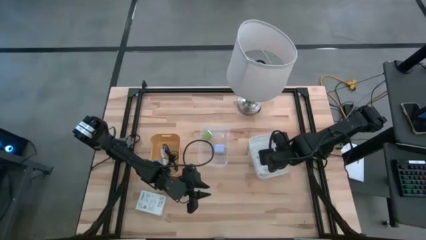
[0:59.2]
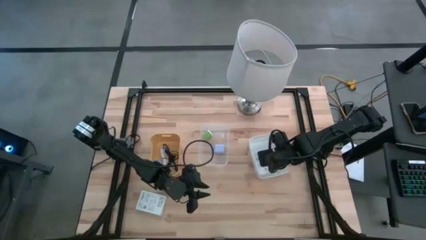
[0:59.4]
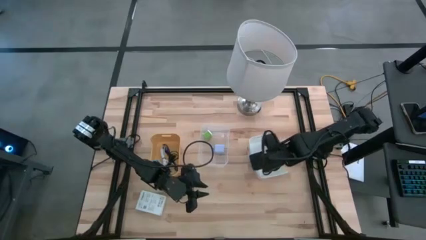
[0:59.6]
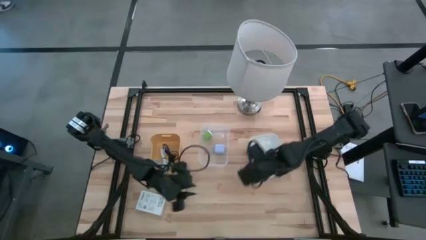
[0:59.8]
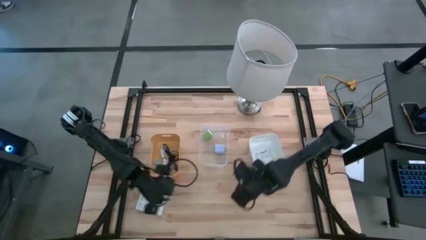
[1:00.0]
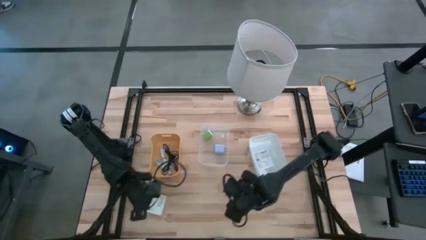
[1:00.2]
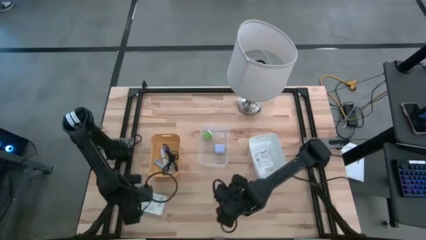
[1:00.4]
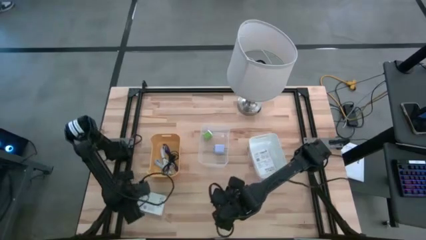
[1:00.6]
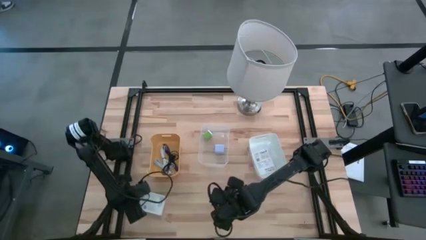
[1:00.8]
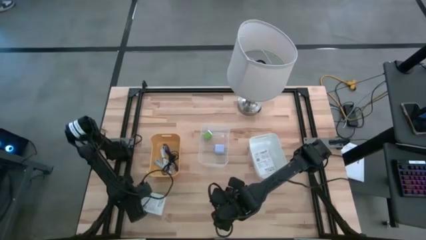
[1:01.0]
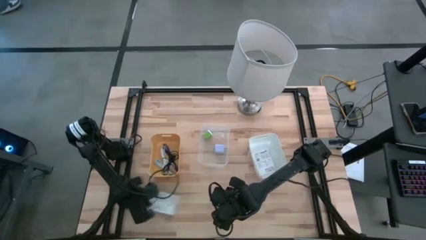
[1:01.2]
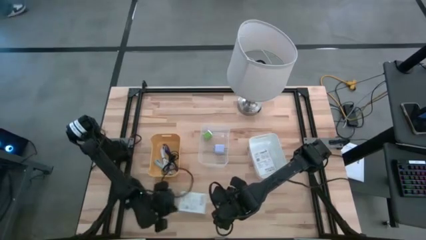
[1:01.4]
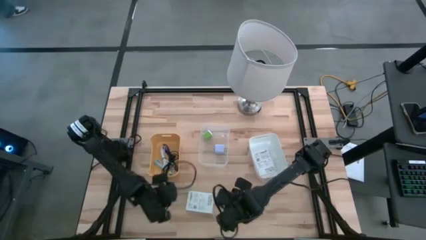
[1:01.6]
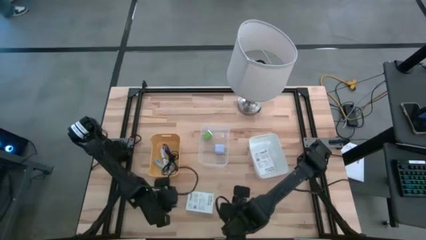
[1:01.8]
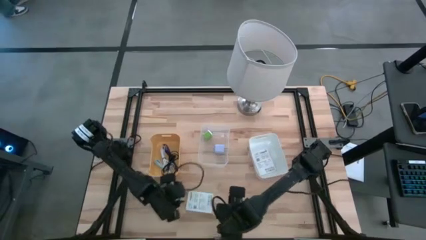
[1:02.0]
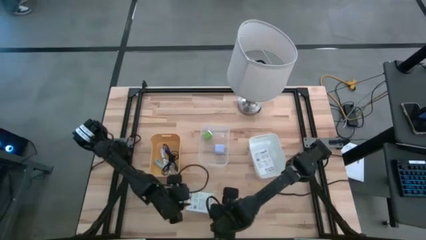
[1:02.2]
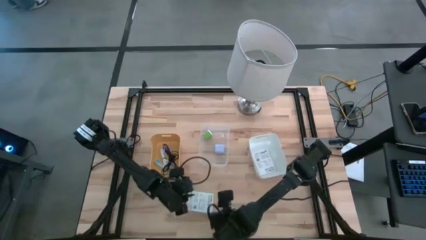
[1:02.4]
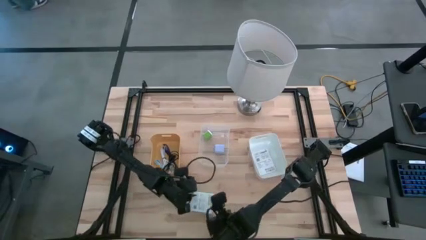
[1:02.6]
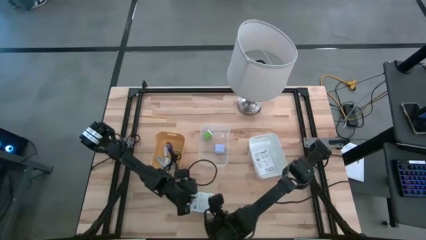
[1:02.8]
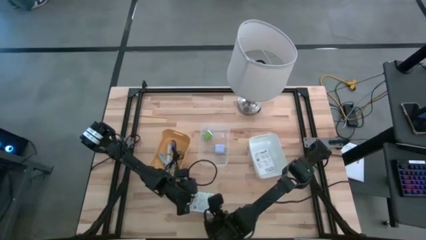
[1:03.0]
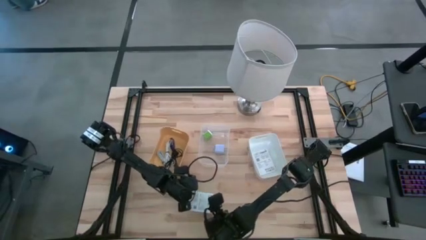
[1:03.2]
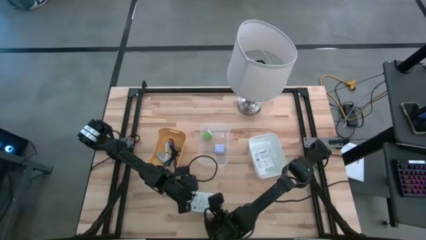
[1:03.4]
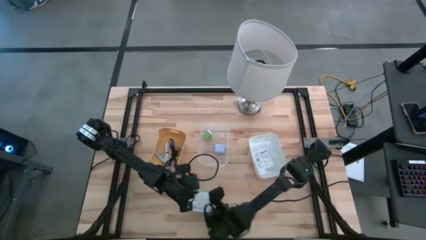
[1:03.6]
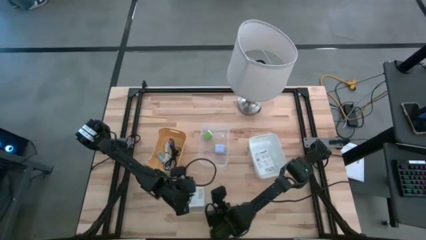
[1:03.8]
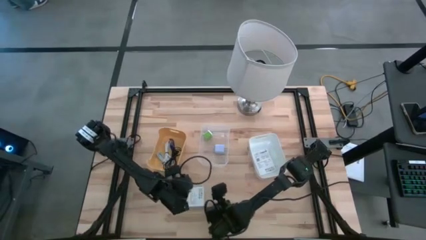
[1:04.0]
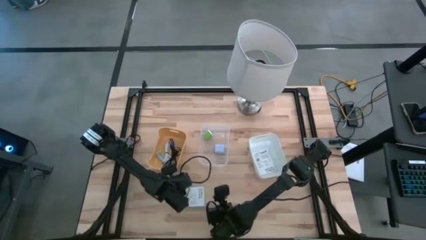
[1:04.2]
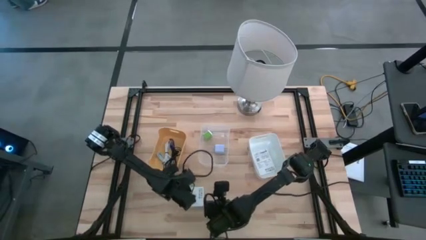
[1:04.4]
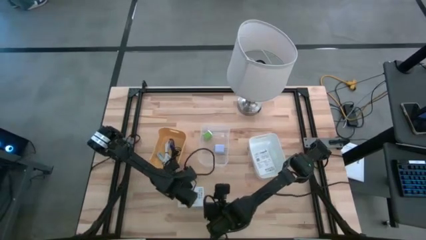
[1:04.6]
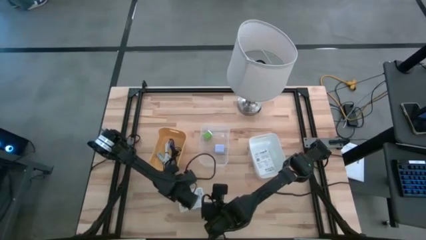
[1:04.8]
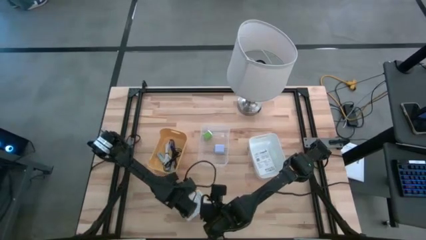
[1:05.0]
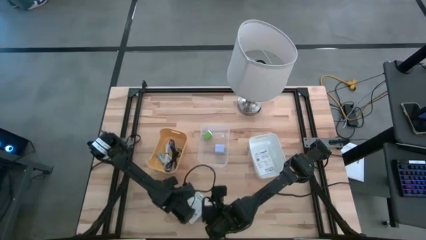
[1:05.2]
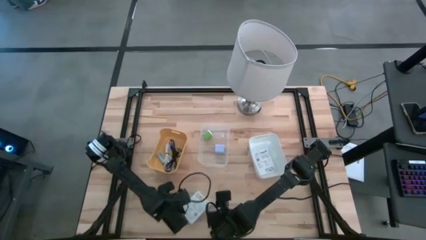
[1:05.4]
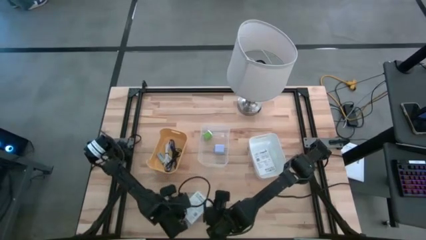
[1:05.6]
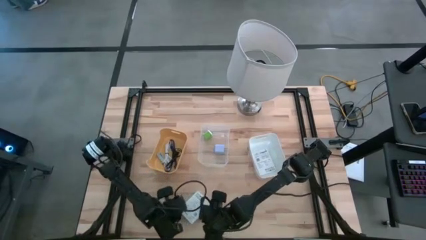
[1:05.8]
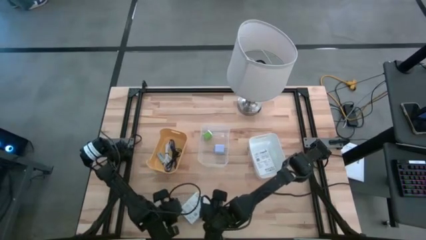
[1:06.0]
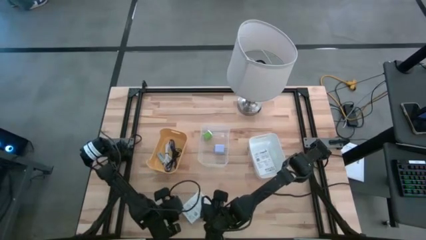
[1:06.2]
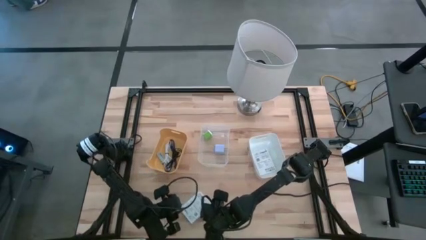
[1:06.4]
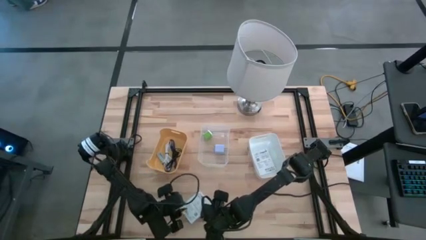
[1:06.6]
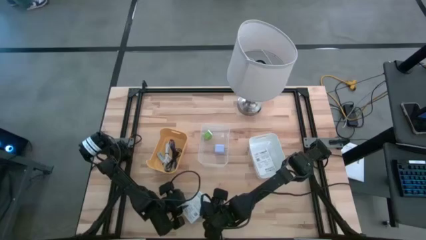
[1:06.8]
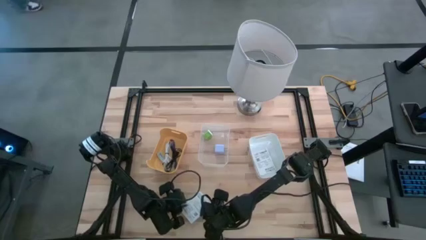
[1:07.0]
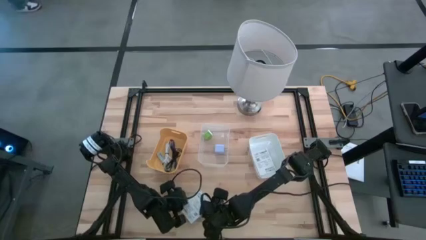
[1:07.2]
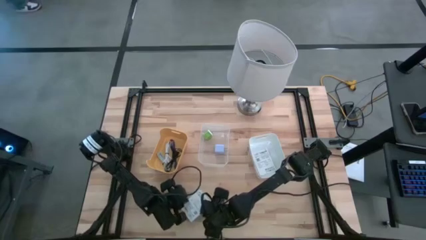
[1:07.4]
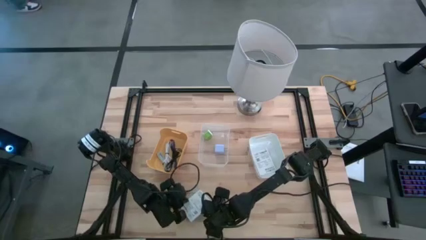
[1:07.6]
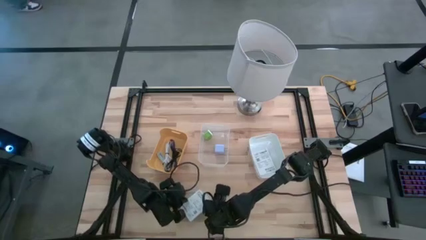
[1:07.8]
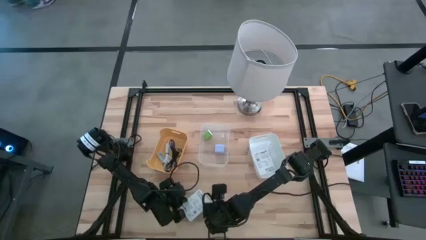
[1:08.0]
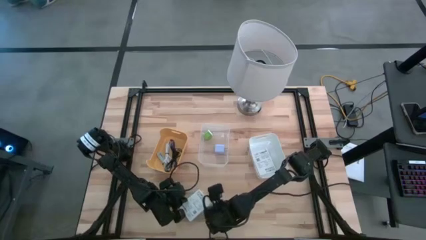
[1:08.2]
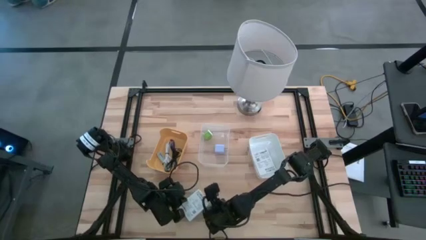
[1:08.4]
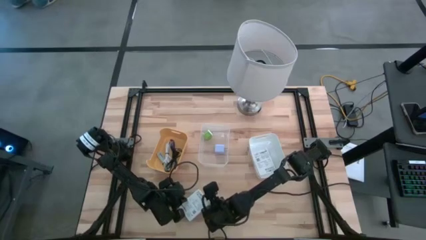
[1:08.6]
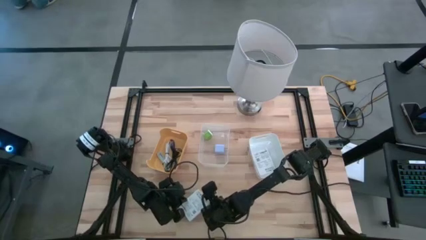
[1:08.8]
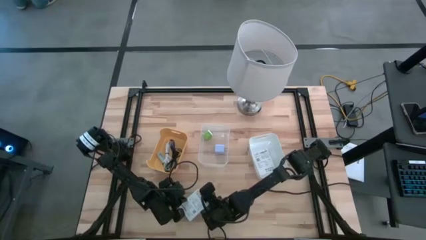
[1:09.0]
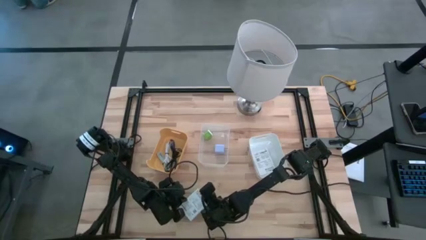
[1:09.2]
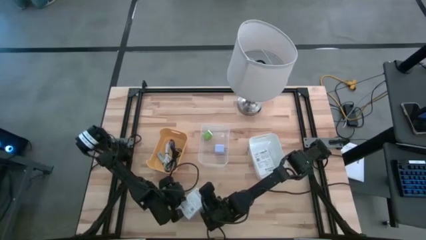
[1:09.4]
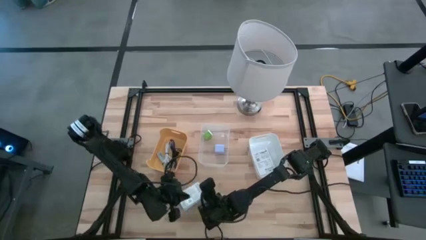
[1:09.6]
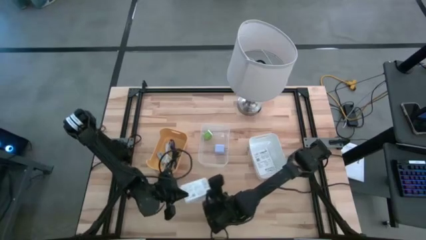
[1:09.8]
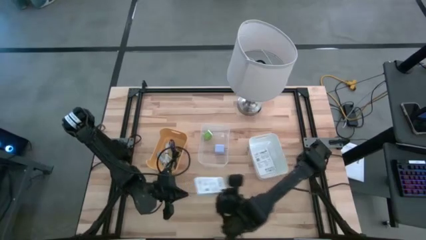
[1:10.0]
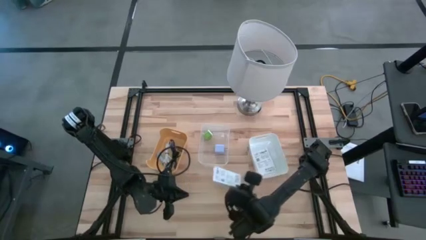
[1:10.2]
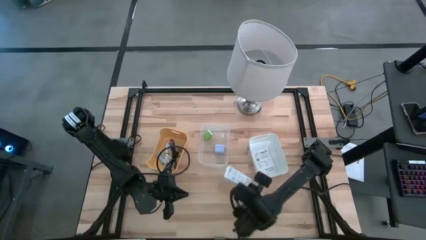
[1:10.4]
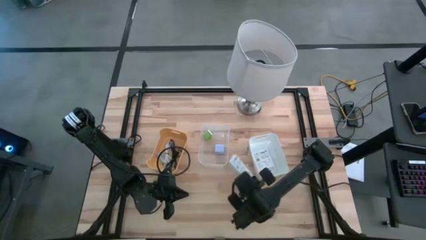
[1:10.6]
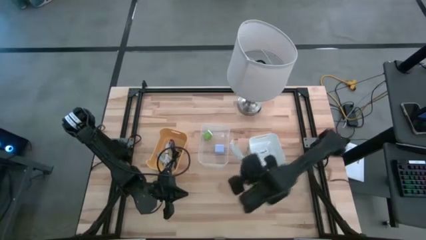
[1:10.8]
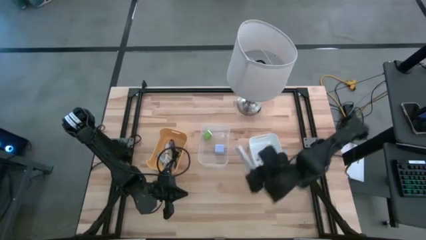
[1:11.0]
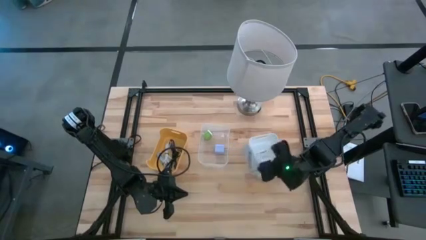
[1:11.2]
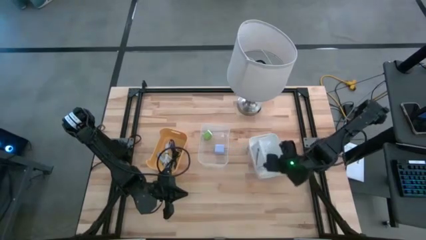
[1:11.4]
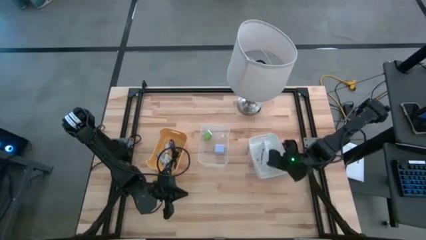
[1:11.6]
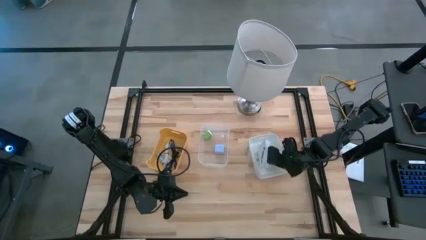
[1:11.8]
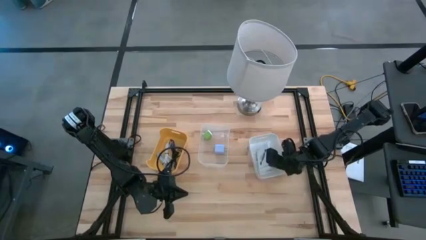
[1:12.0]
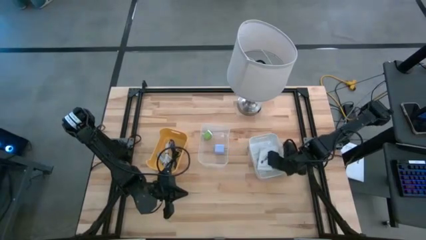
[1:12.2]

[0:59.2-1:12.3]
Task: Pick and place items into bin
Put the white card reader box into the white bin
